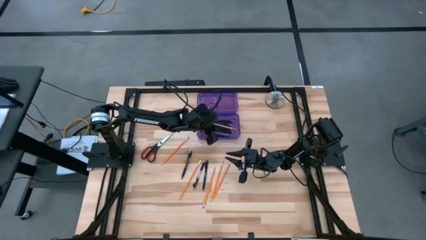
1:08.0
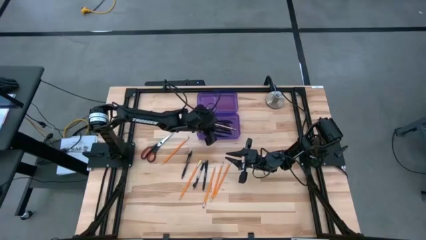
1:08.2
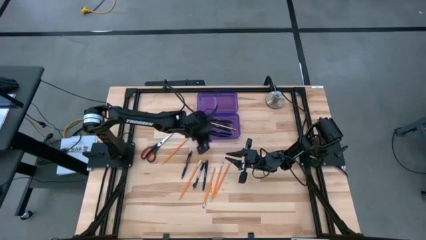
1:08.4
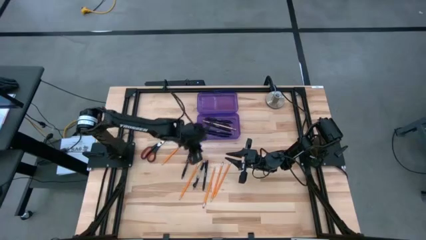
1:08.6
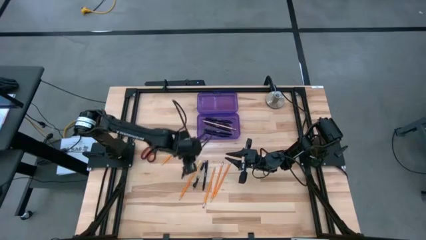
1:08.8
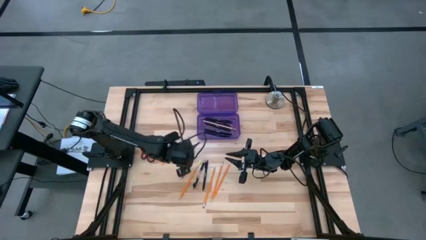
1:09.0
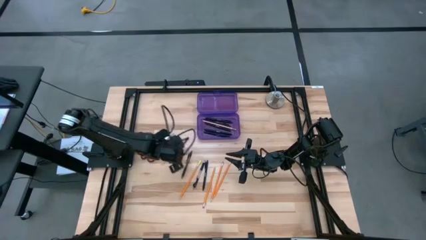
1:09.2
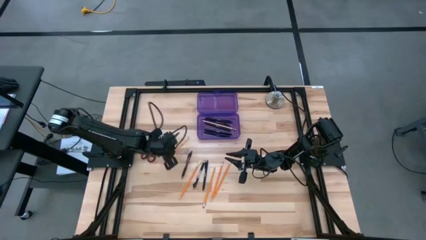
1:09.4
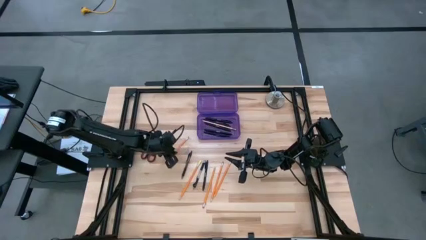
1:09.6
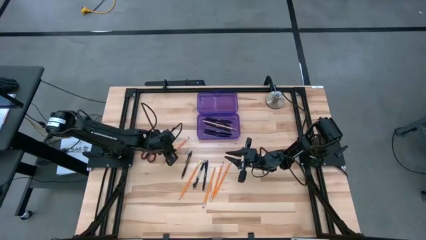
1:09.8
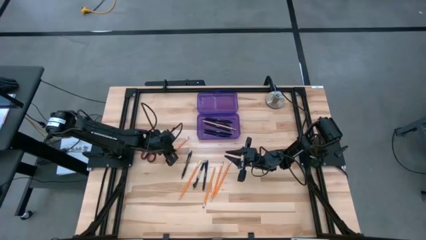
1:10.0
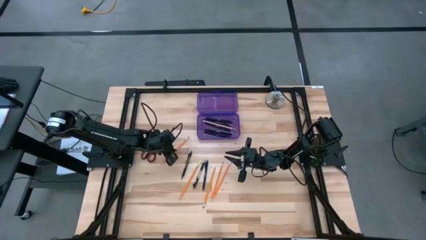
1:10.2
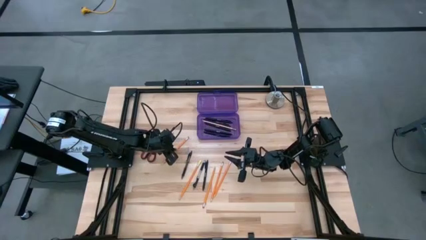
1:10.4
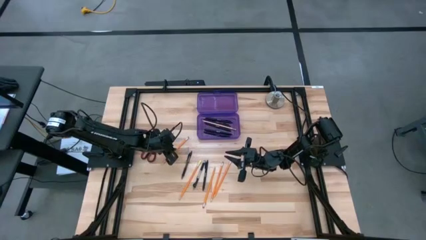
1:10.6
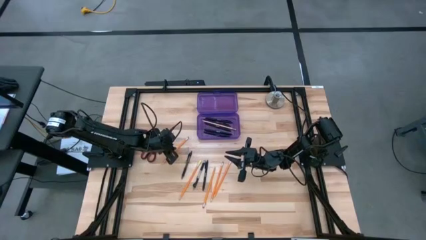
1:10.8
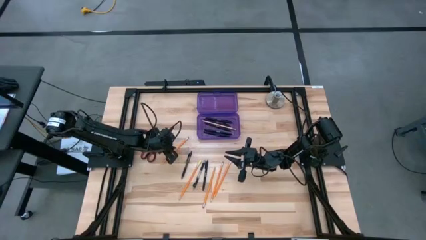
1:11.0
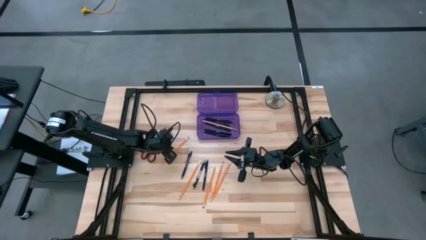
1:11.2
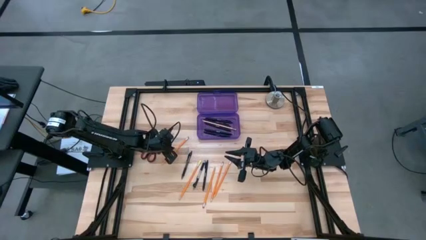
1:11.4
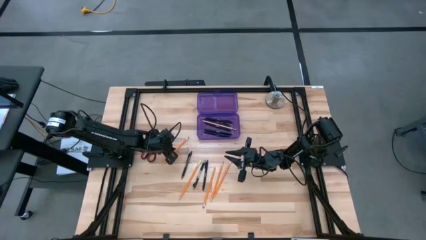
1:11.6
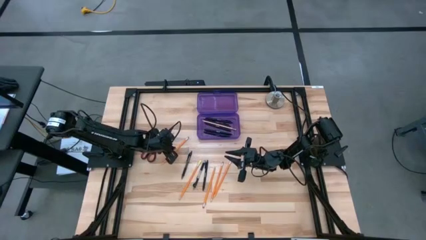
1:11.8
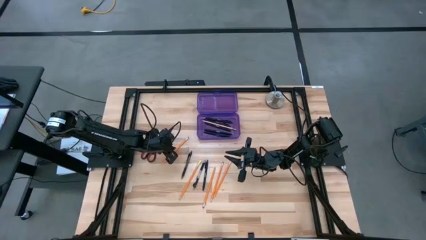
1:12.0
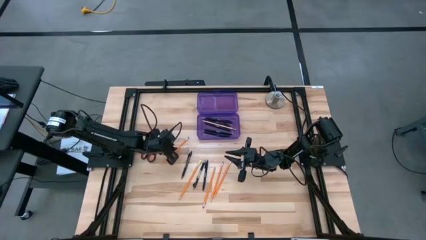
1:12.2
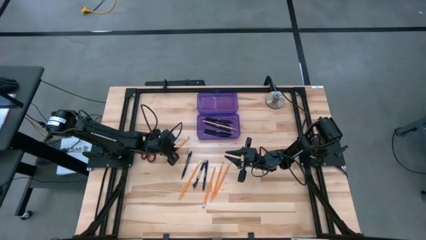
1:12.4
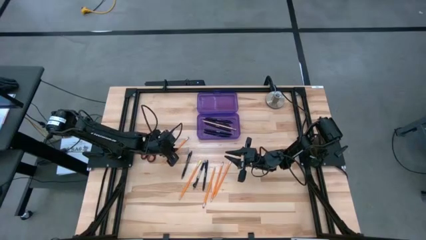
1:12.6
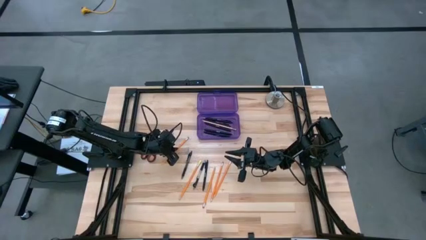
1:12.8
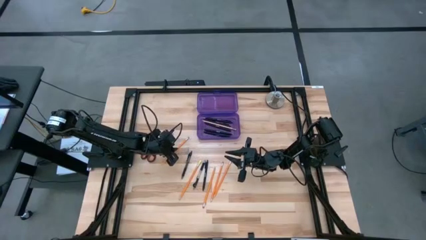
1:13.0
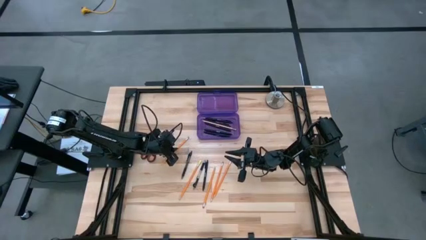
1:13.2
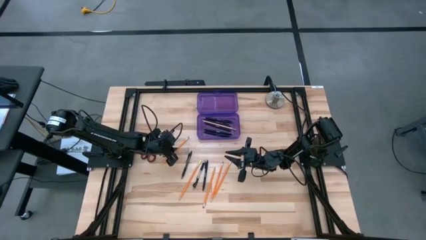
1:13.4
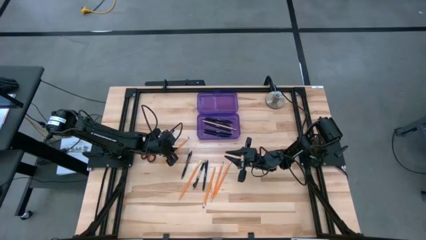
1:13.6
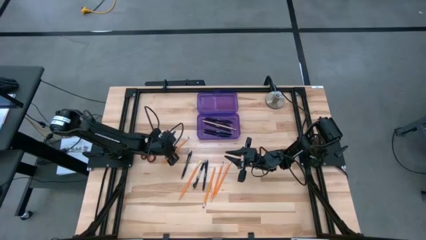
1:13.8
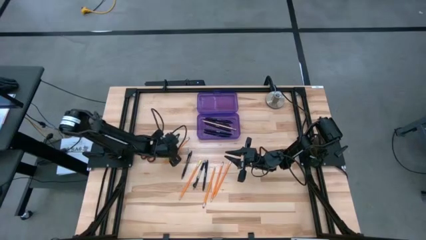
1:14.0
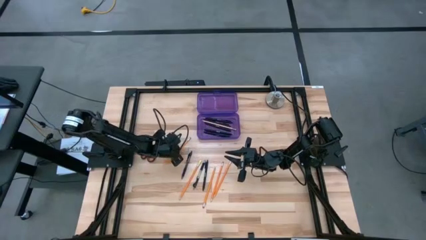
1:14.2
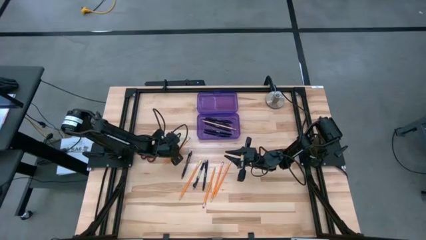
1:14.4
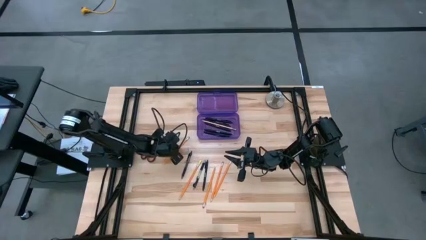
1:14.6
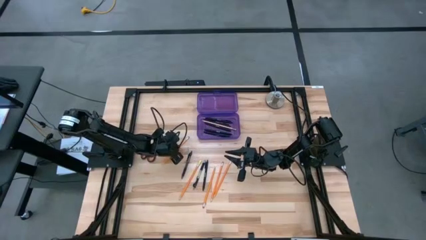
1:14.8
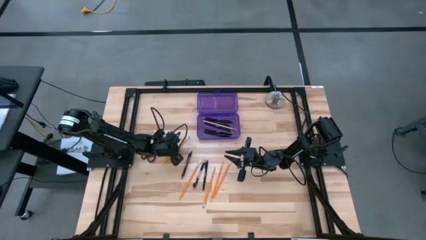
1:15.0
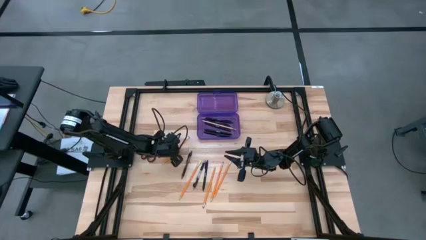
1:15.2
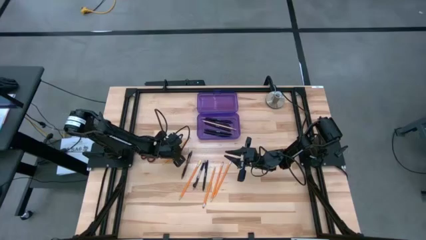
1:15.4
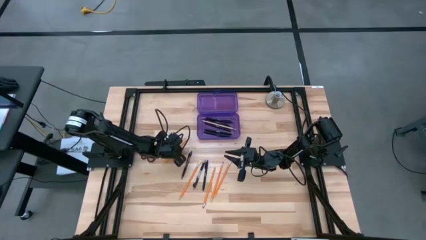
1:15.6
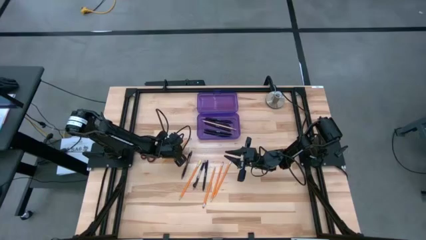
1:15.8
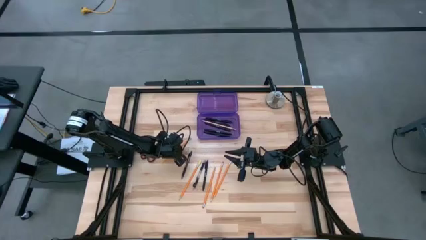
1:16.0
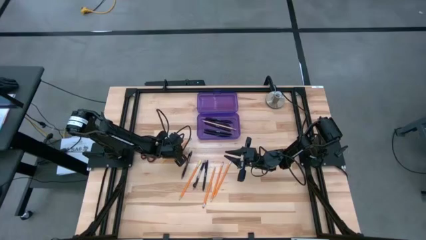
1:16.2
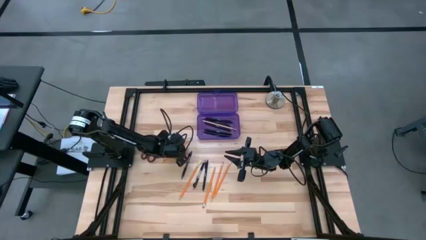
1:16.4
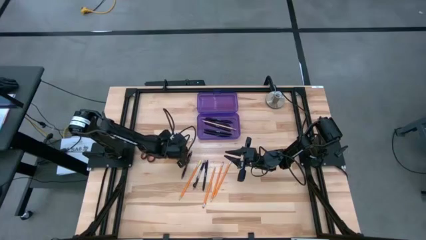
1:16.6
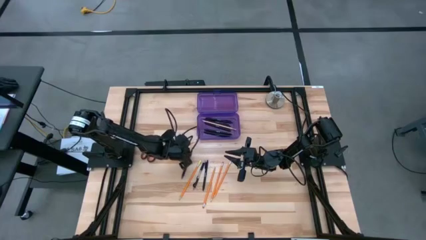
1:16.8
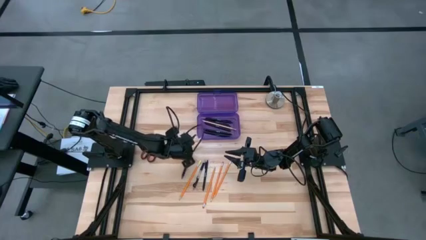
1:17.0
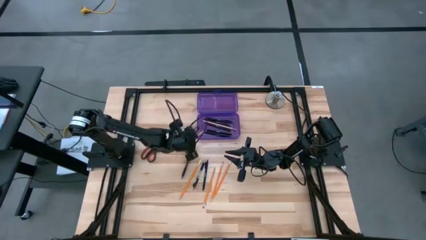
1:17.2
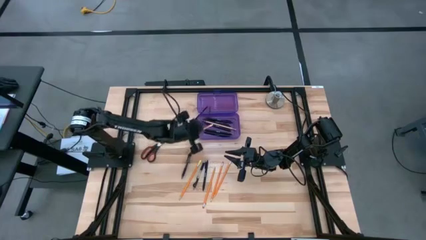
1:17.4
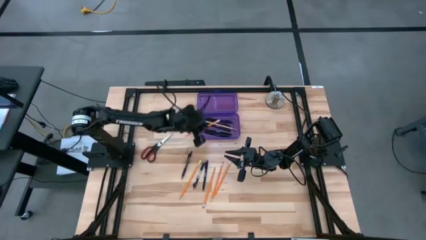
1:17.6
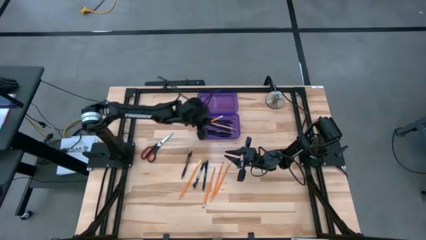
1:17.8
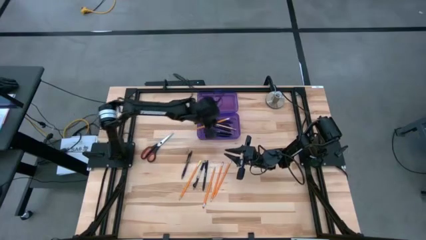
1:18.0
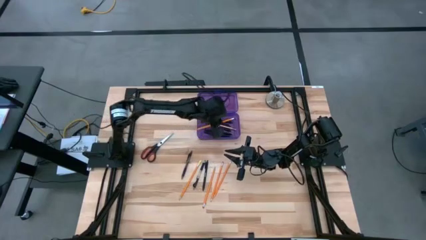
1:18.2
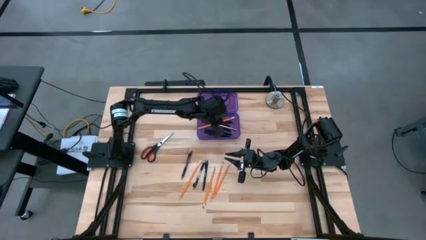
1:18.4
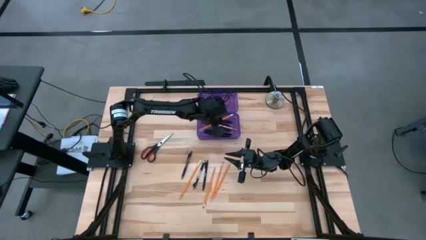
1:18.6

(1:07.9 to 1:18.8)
Task: Pick & place school supplies into a supply box
Put the orange pencil into the purple supply box

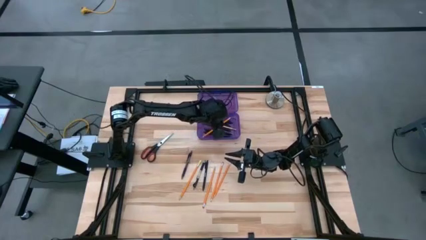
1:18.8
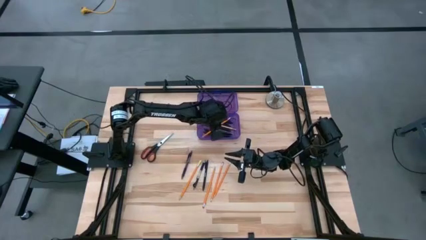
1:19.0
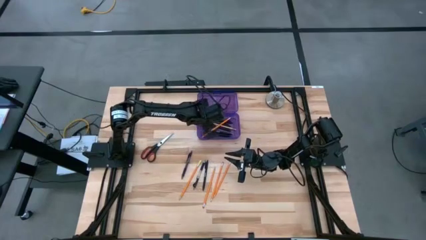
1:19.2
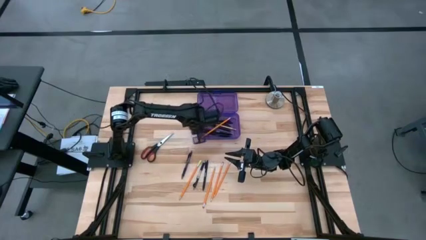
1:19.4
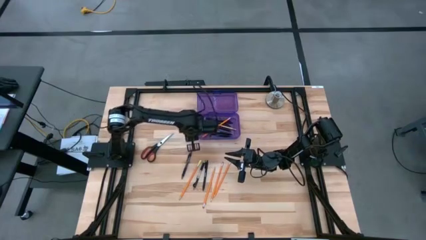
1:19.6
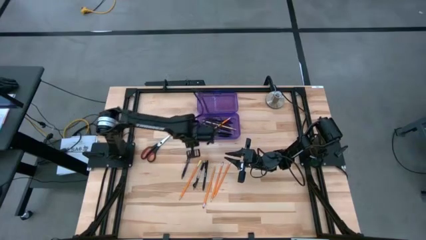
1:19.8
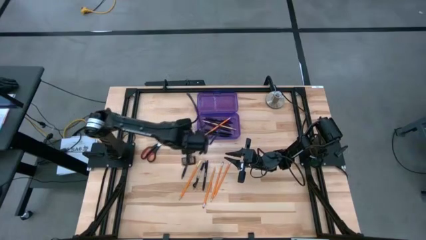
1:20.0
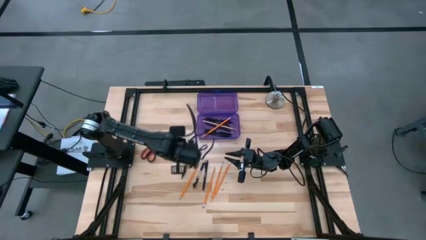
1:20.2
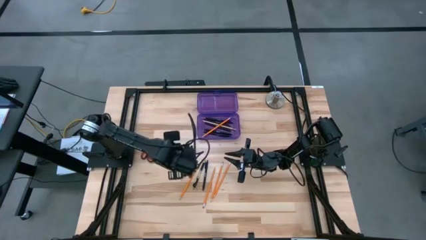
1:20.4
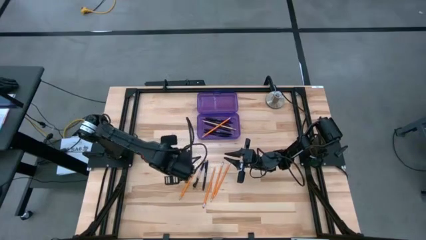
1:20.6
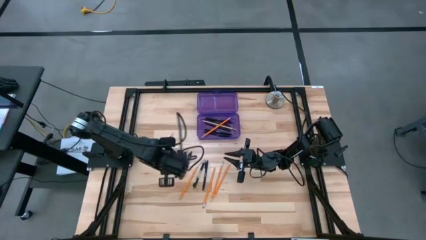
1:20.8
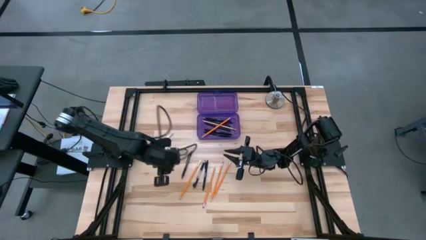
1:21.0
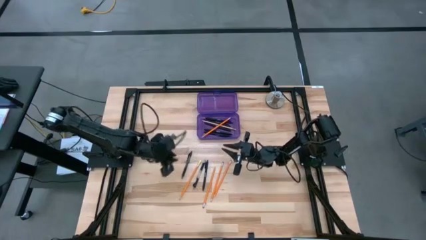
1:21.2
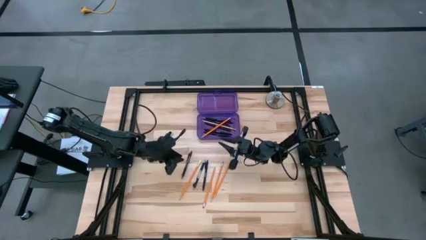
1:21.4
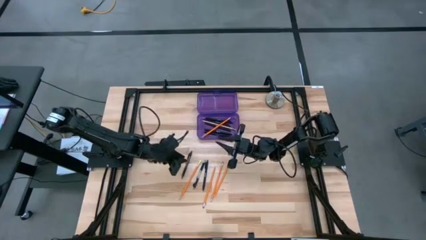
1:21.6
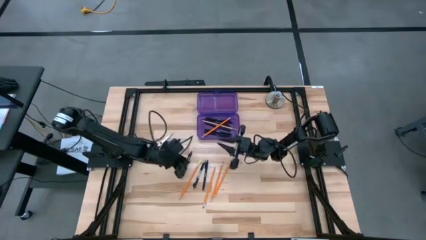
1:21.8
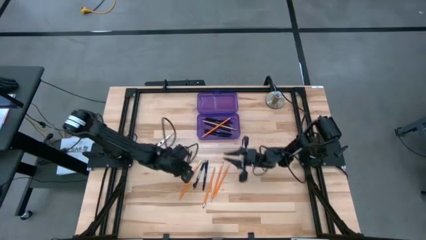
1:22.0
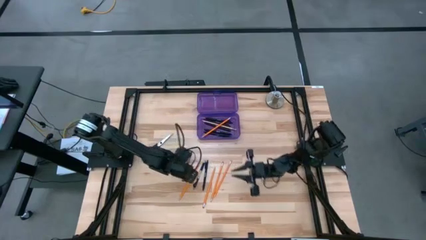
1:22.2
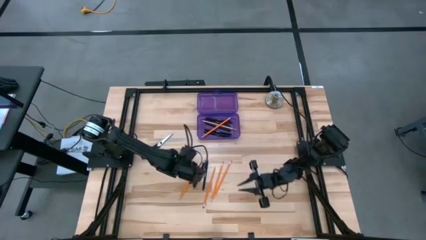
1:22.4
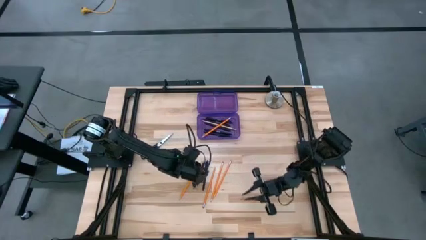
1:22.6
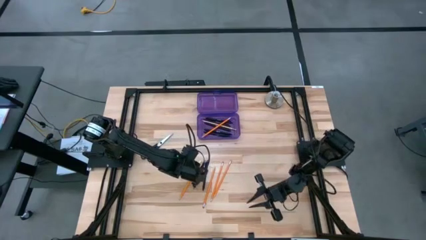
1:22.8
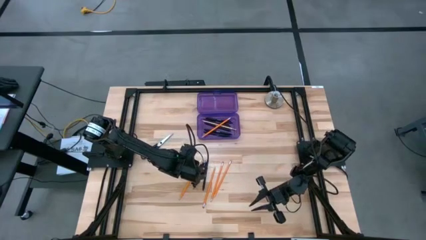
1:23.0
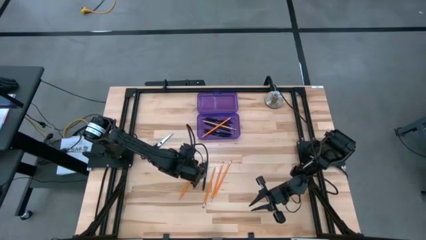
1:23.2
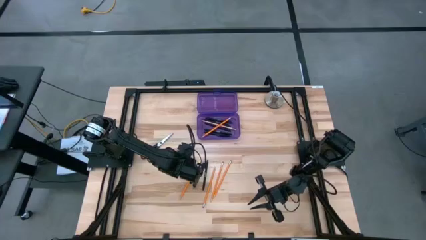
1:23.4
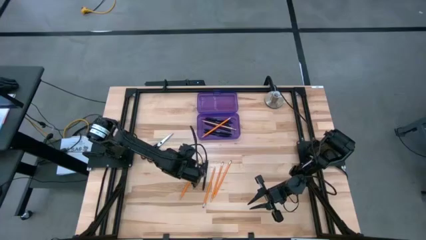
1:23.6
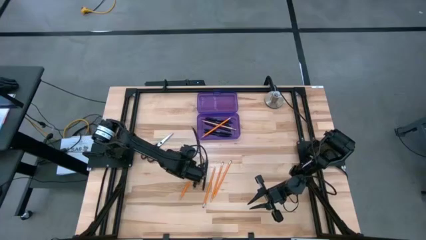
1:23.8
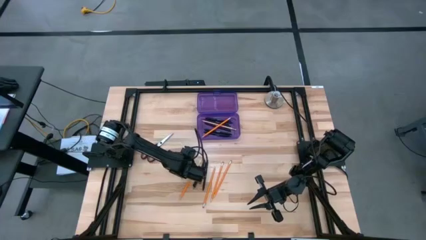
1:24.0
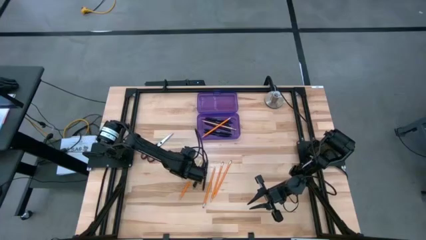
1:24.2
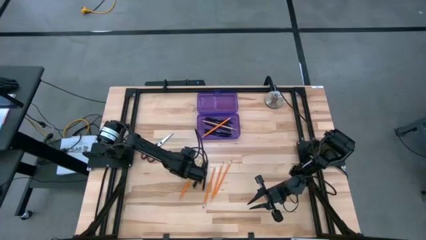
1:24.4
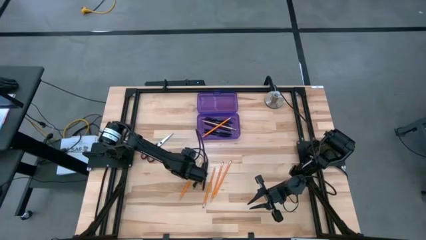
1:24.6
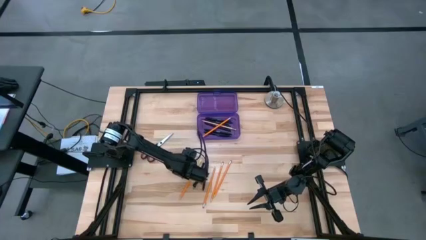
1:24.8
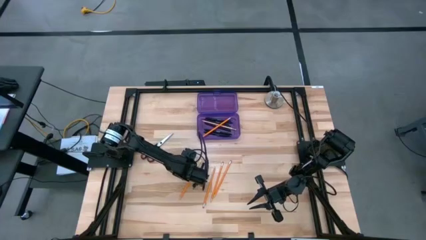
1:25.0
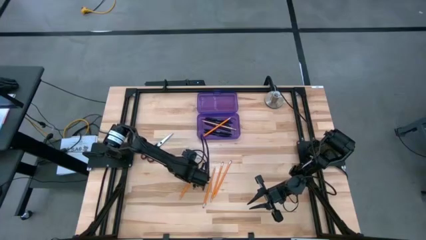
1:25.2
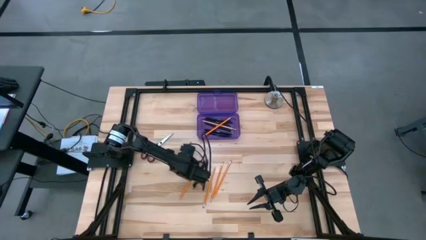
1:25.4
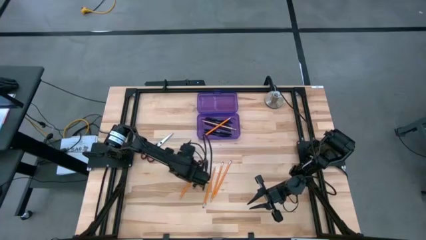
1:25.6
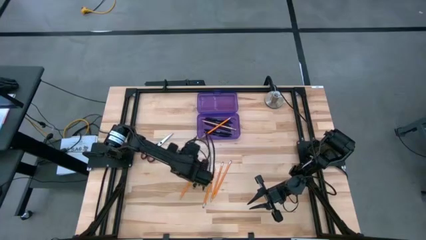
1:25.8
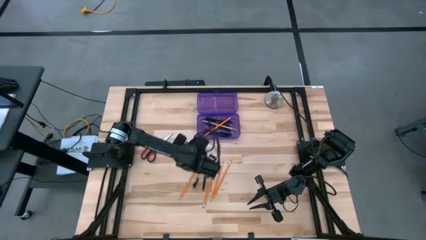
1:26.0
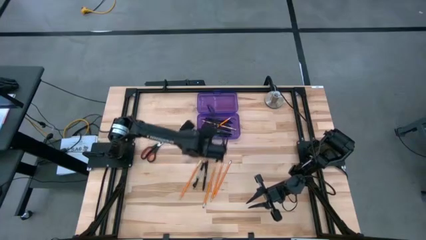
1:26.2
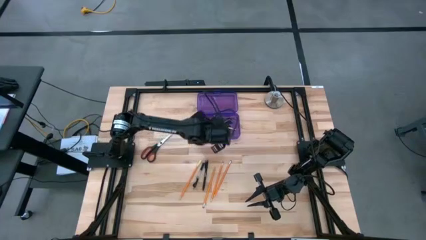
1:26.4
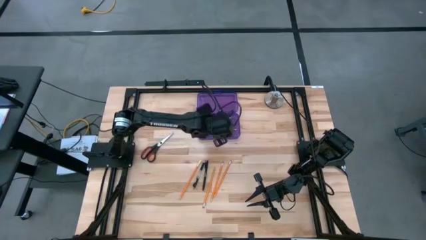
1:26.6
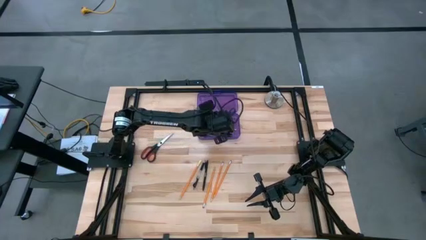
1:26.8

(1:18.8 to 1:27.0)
Put the black pen into the the purple supply box
